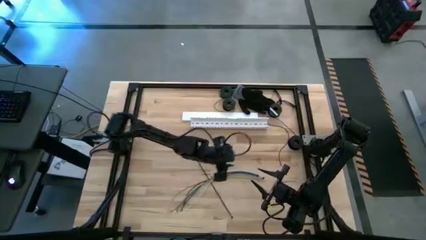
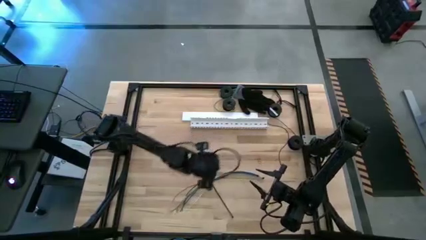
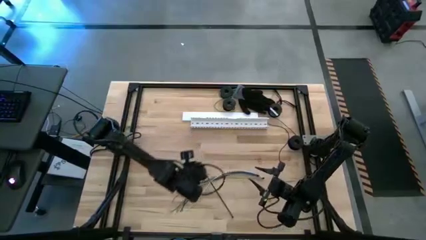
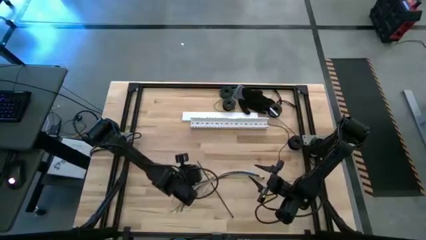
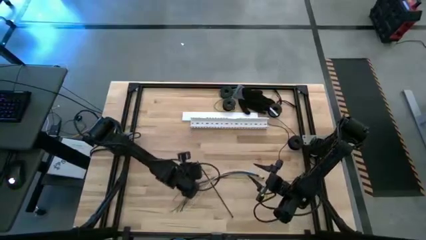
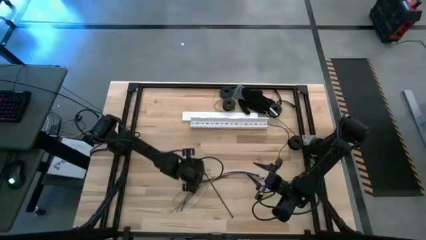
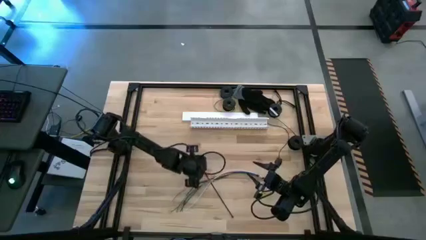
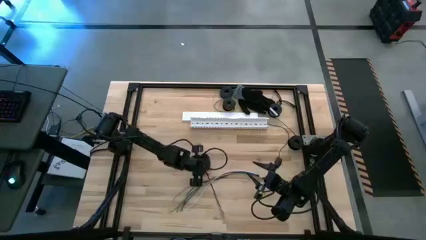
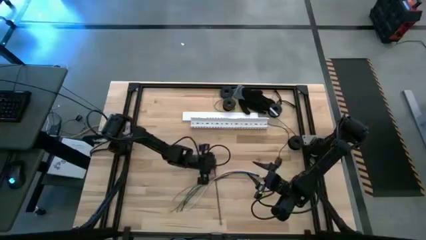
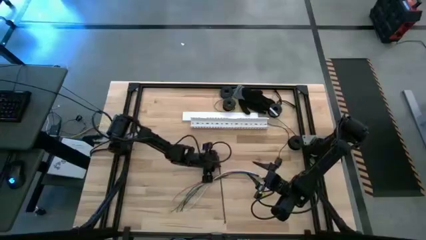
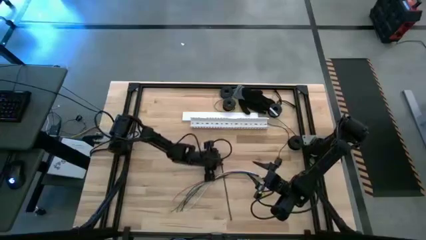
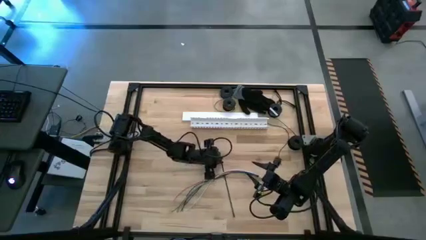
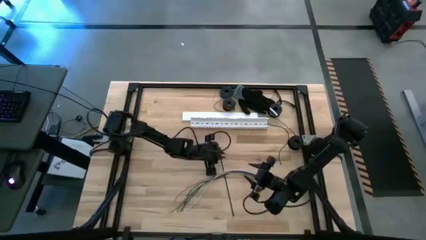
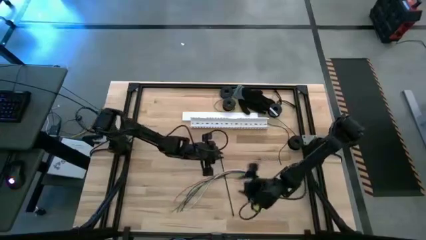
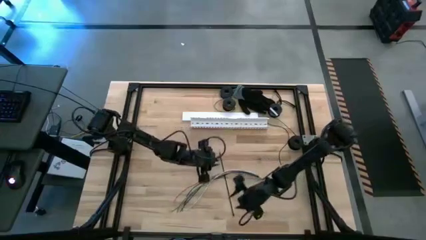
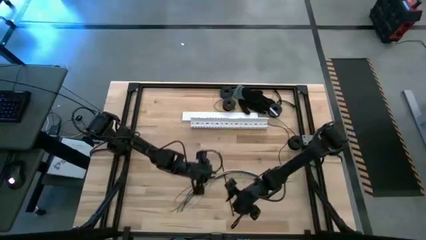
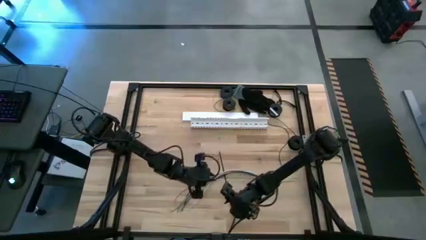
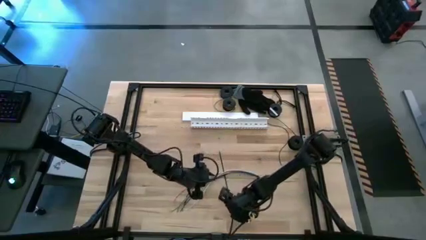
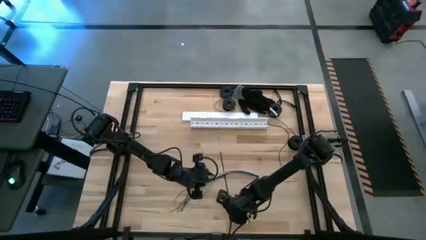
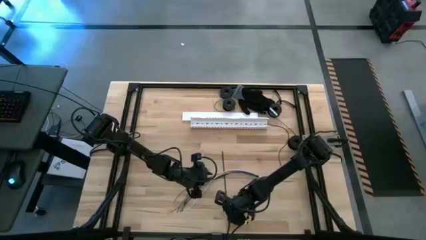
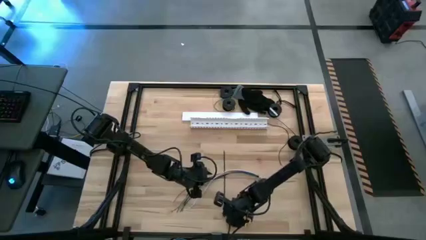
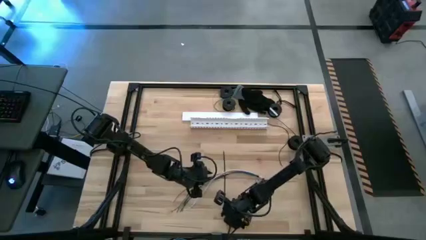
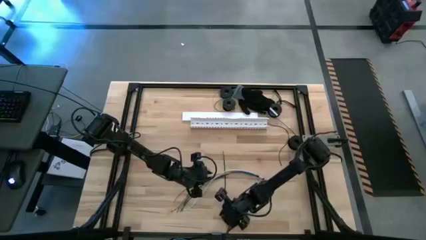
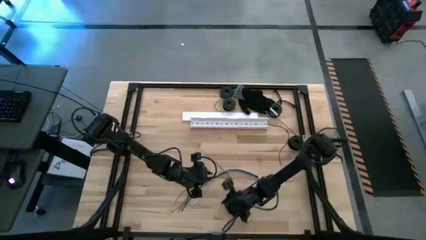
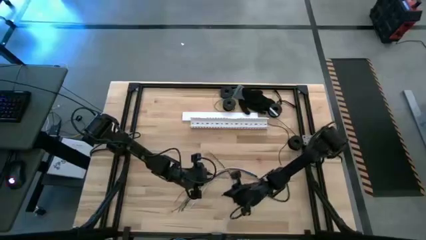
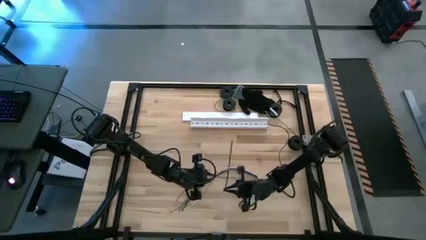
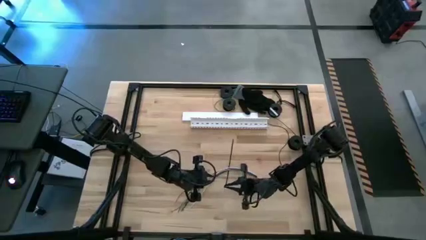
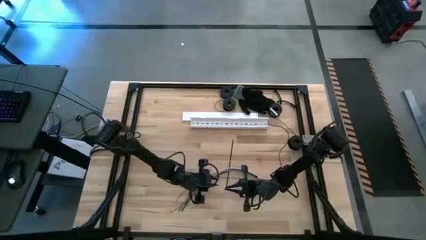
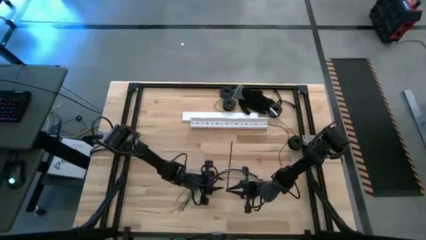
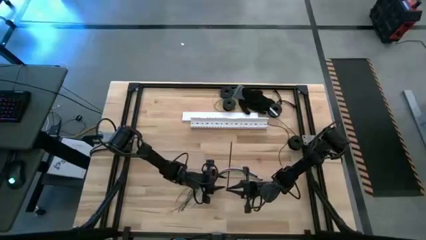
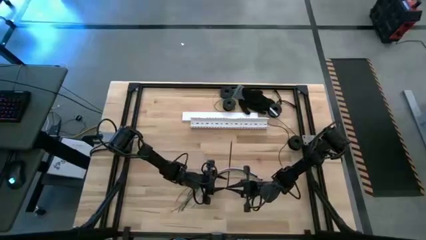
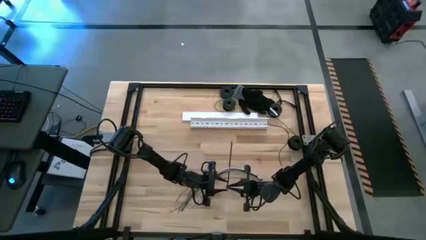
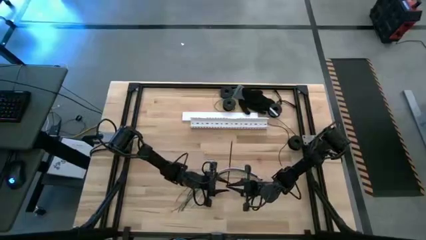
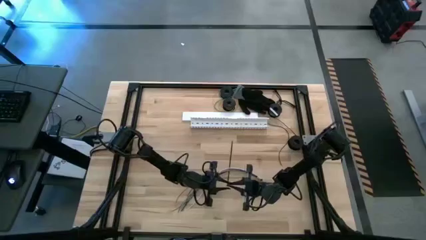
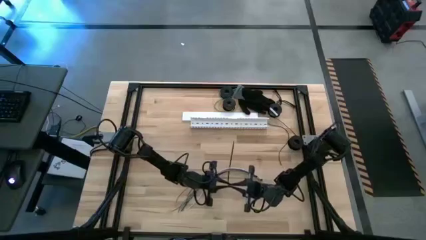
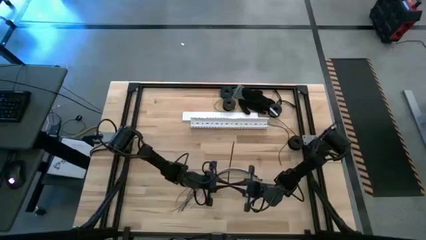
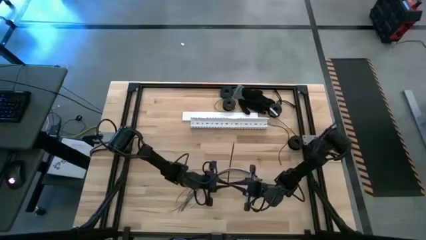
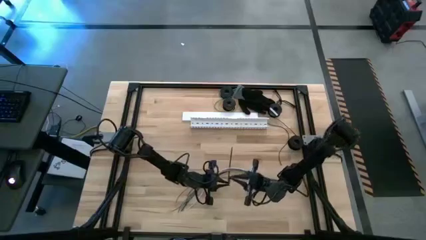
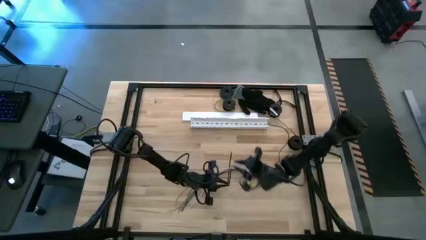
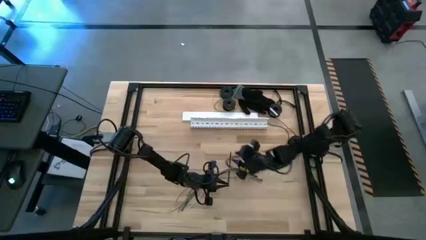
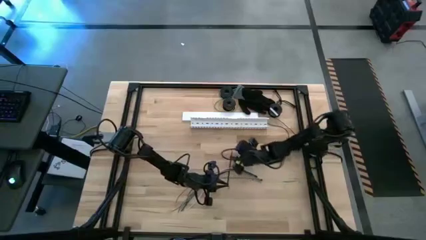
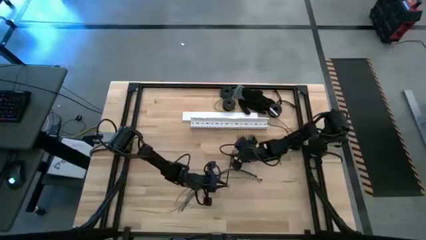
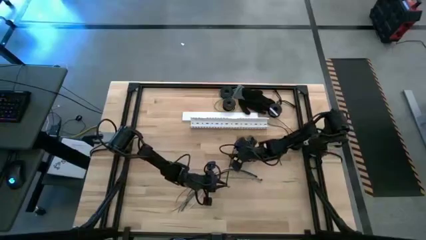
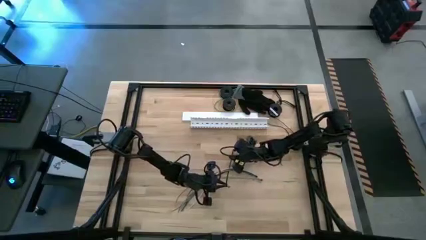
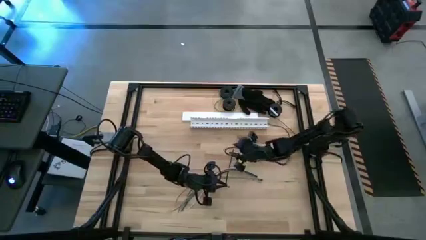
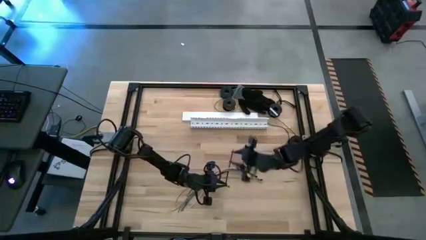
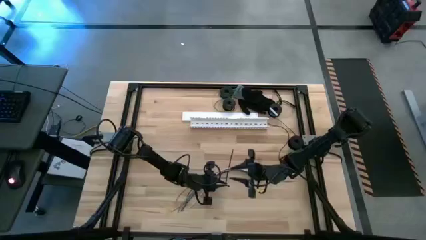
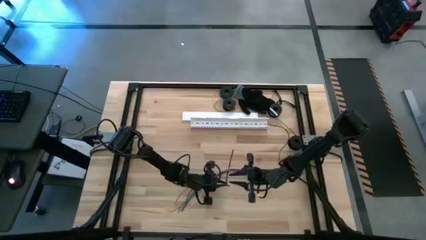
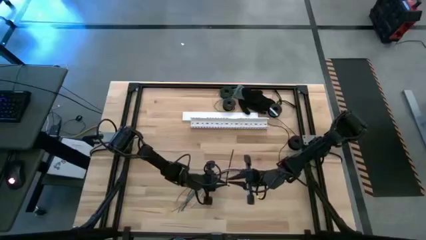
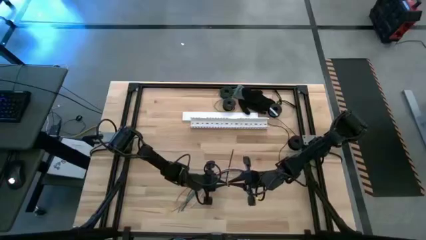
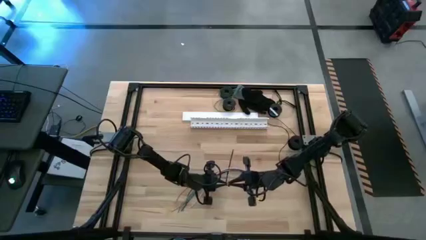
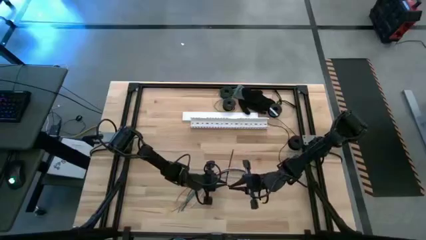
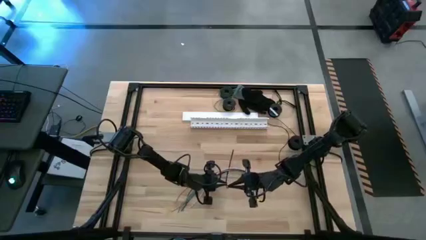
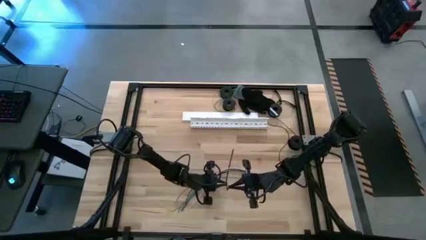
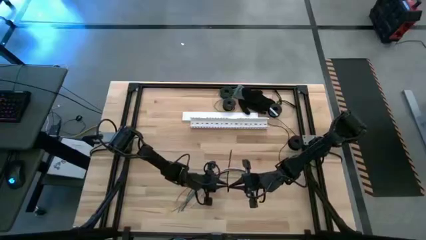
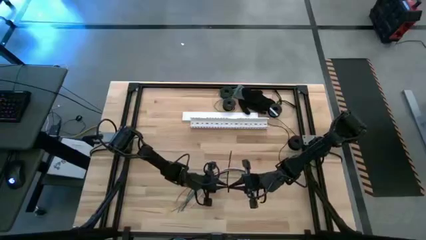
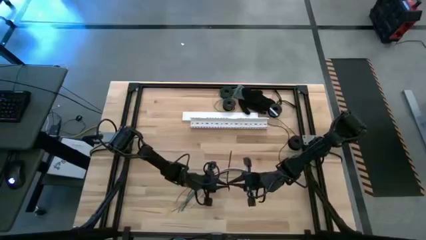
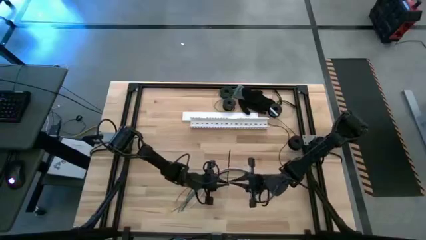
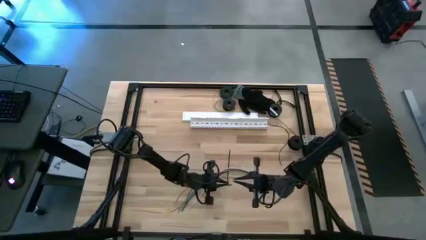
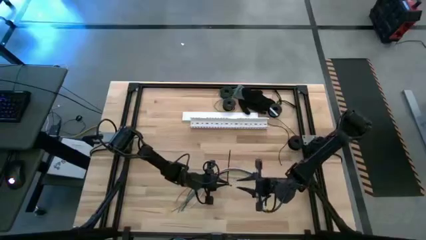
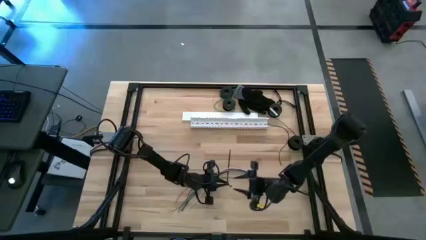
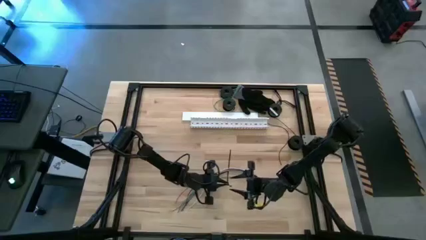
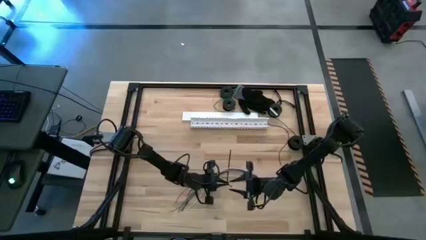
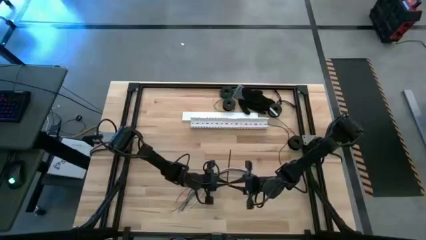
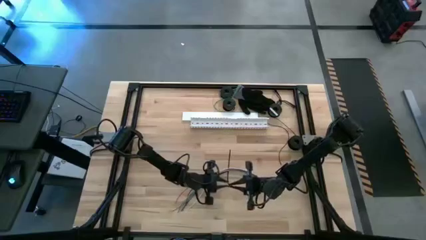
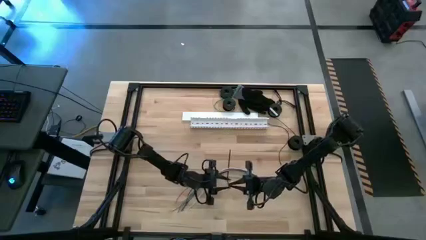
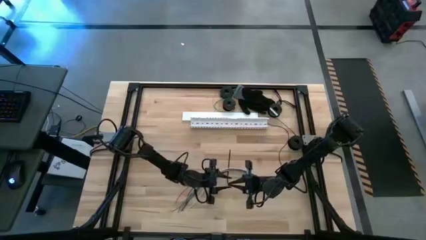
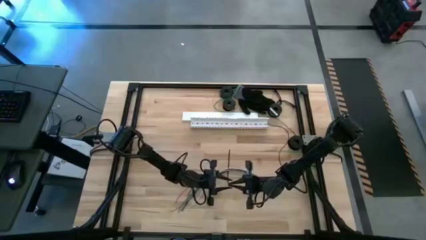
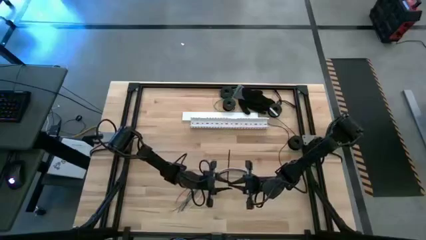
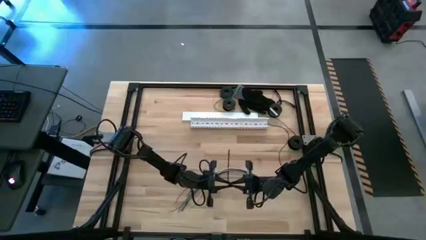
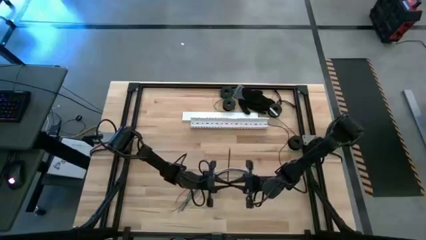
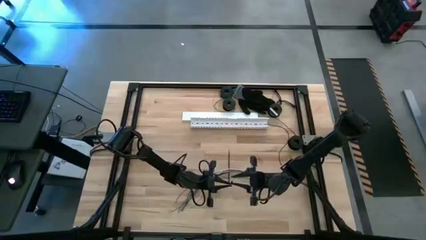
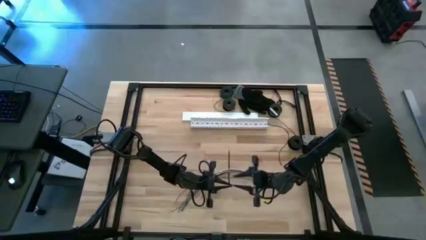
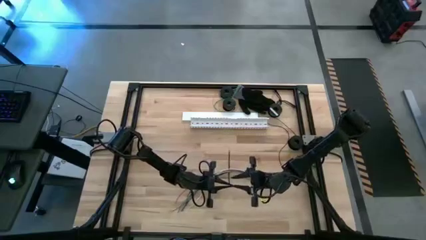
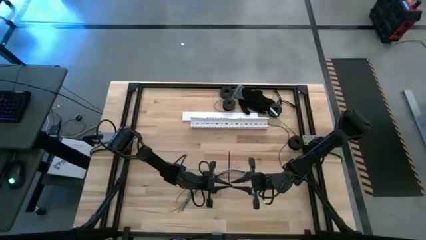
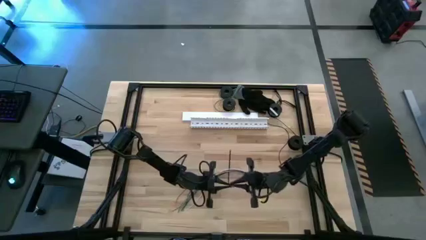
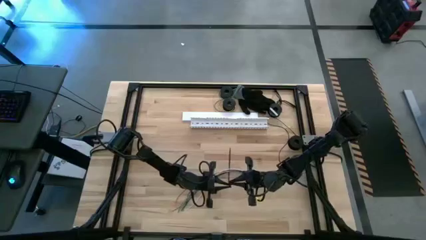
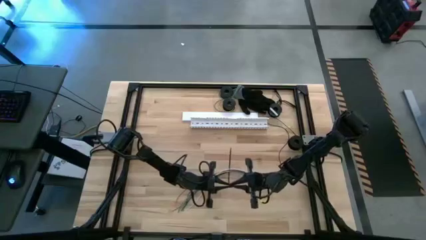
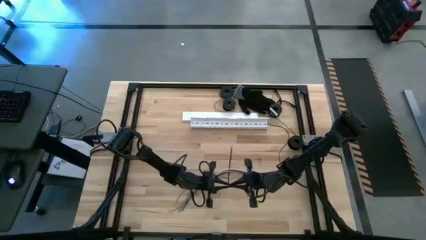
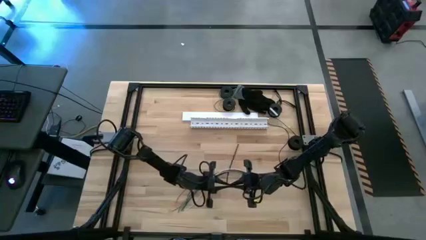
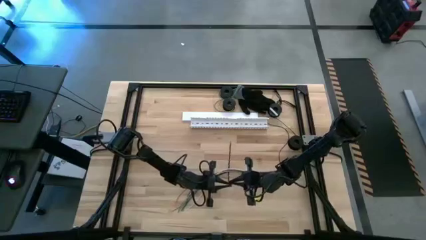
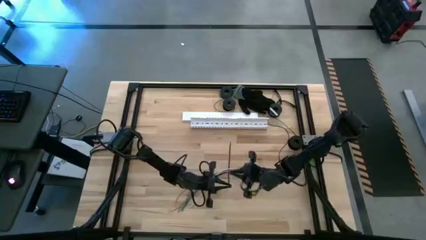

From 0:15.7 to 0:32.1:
Task: Ziptie cables
Wrap the cables together using a black zip tie

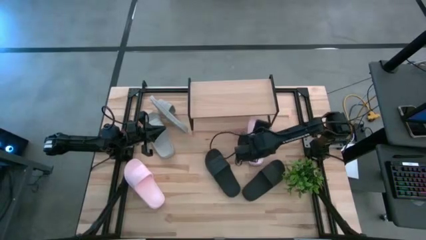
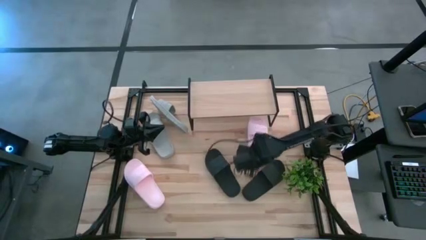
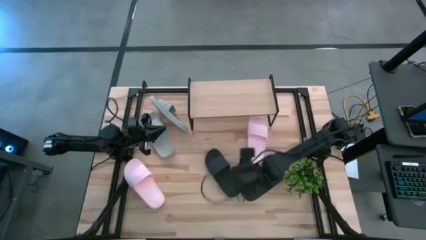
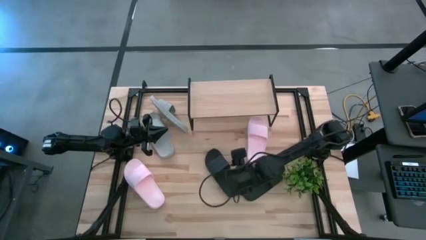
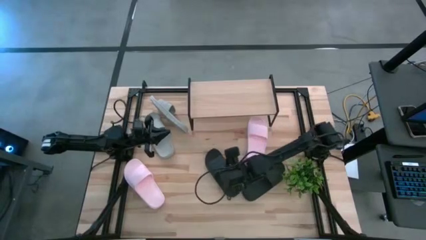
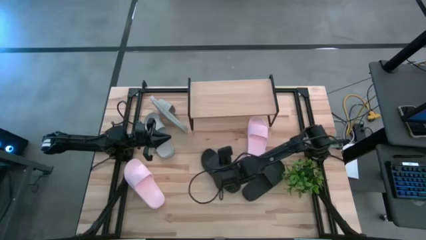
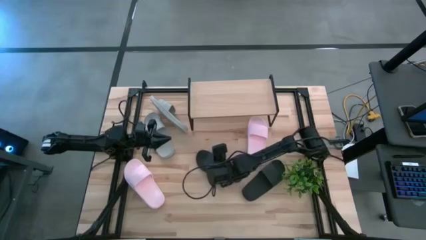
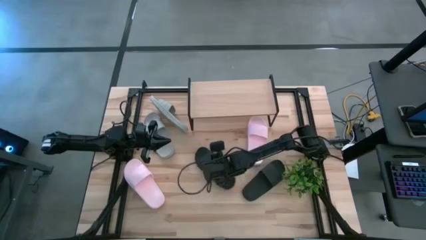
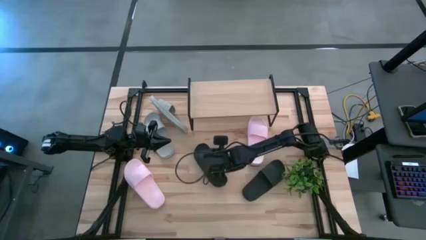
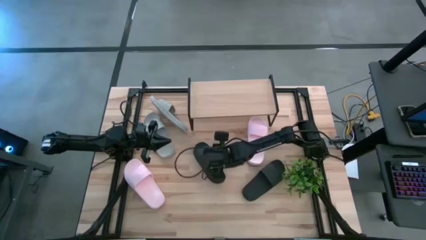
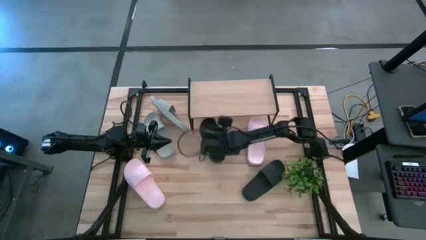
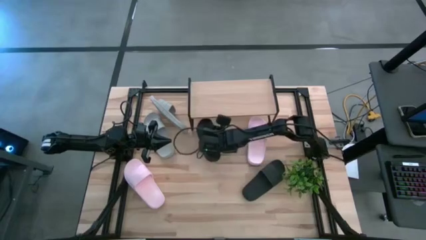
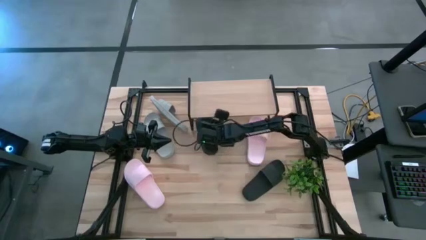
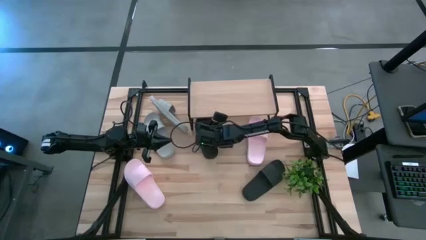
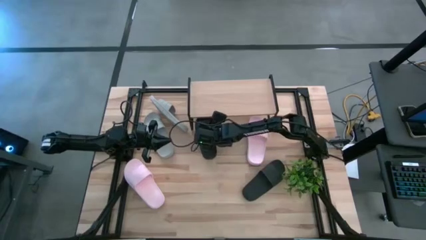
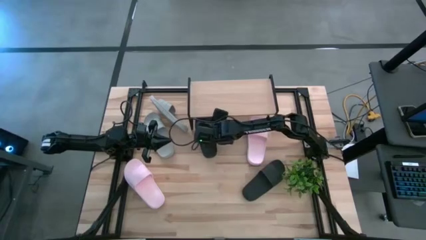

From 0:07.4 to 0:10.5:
Task: Pick and place slides into the shelf
Put the left black slide under the shelf
